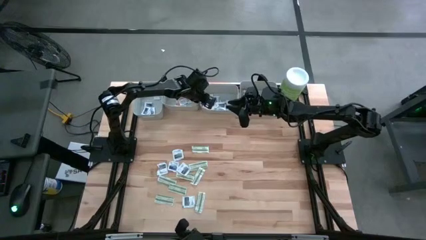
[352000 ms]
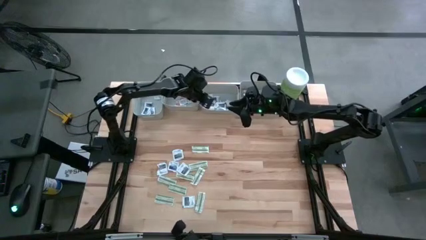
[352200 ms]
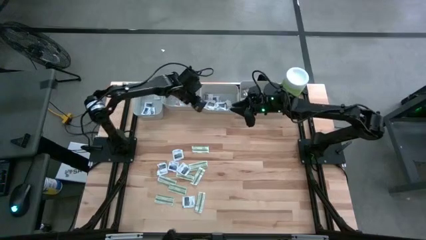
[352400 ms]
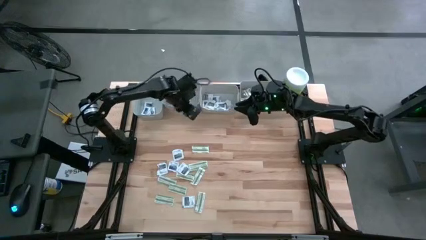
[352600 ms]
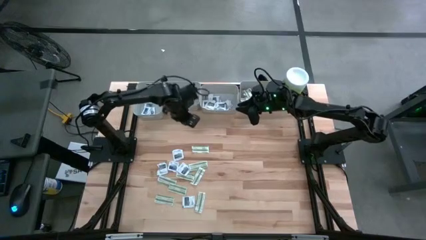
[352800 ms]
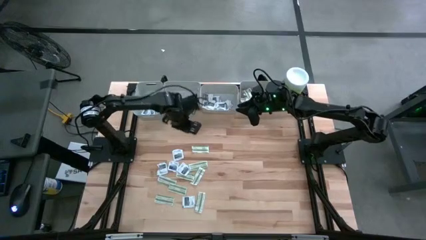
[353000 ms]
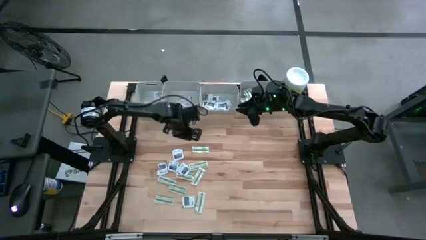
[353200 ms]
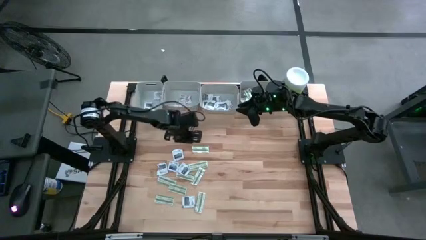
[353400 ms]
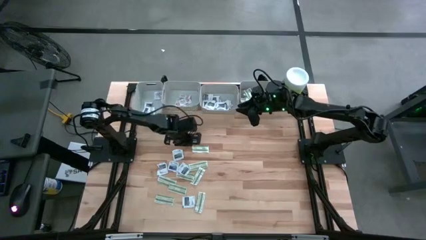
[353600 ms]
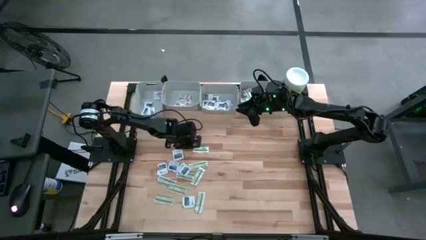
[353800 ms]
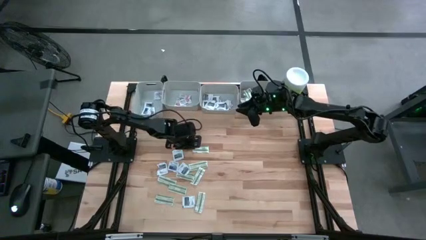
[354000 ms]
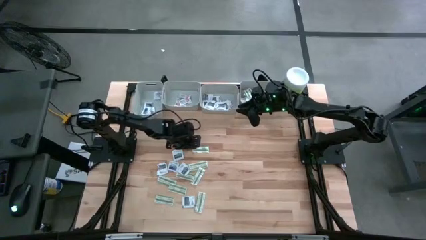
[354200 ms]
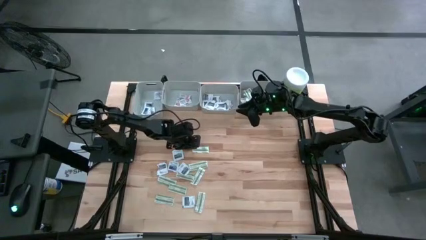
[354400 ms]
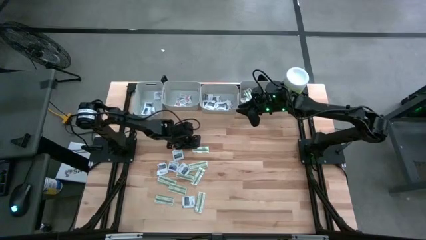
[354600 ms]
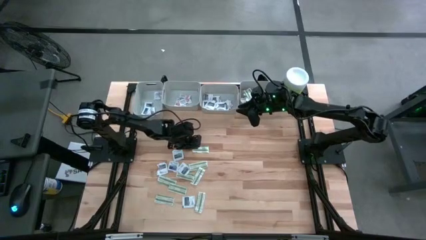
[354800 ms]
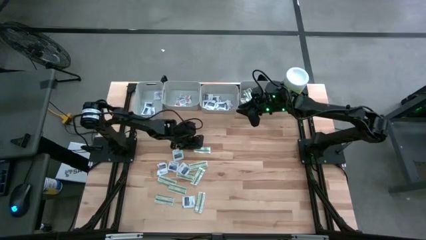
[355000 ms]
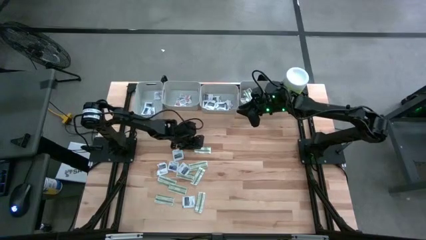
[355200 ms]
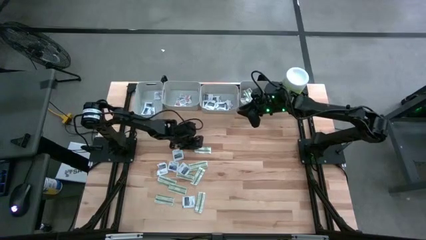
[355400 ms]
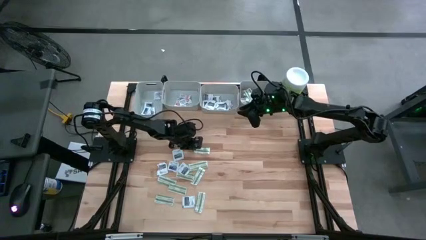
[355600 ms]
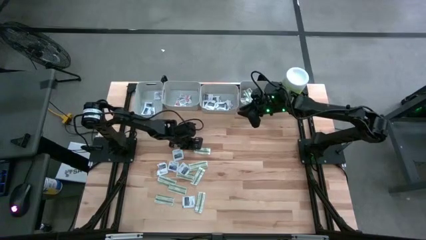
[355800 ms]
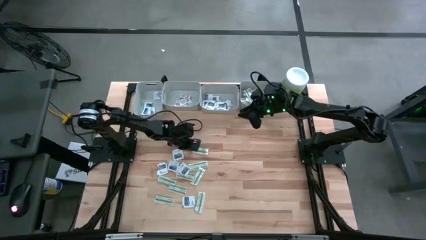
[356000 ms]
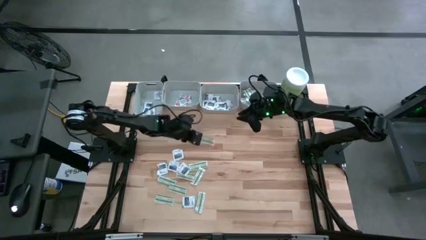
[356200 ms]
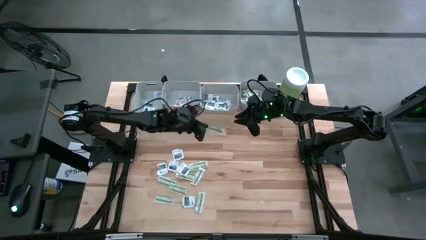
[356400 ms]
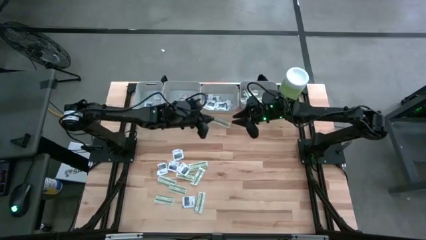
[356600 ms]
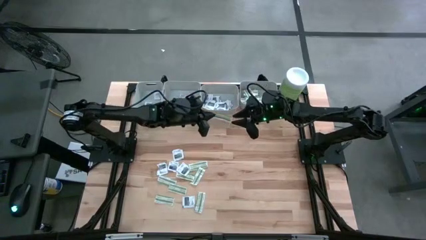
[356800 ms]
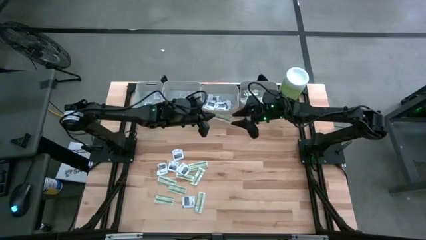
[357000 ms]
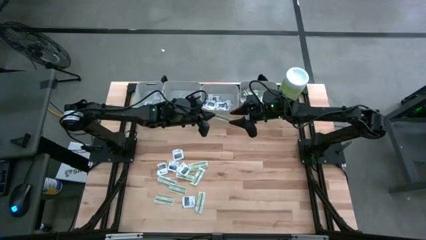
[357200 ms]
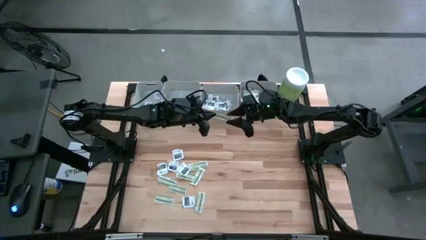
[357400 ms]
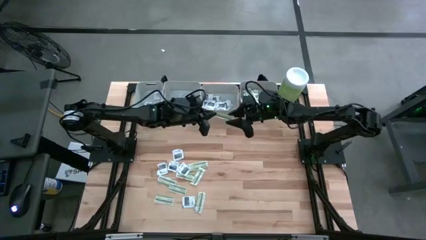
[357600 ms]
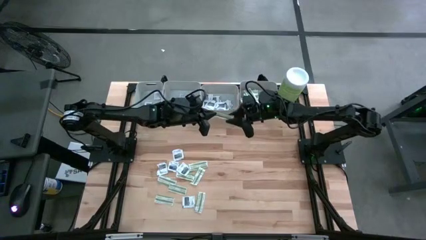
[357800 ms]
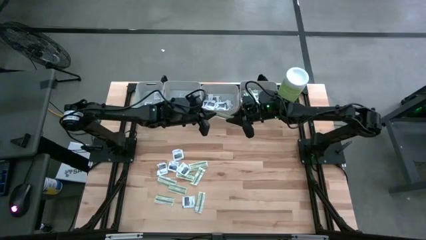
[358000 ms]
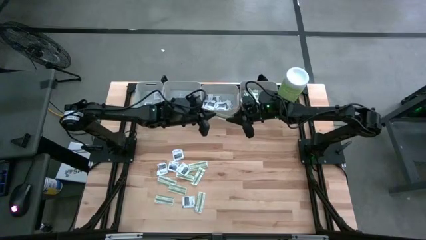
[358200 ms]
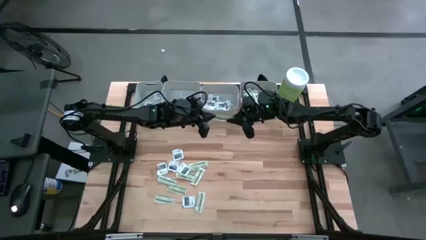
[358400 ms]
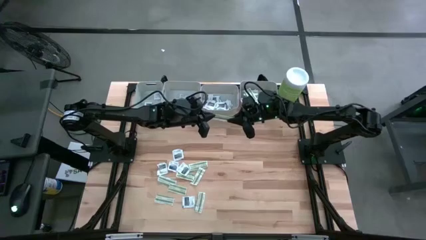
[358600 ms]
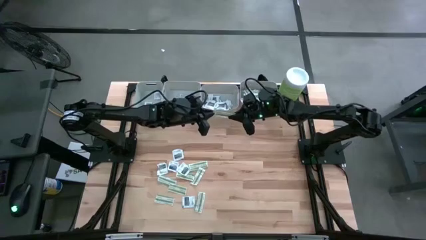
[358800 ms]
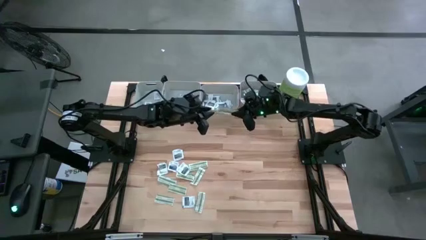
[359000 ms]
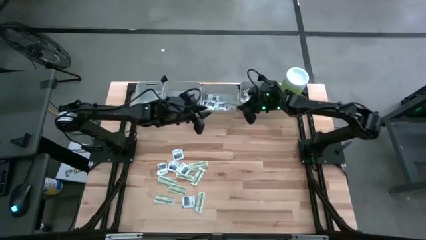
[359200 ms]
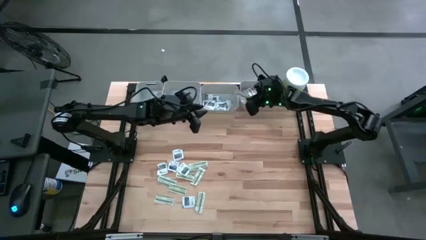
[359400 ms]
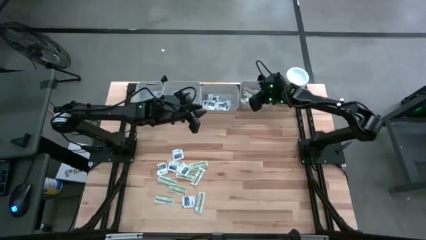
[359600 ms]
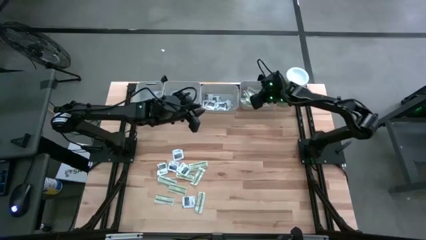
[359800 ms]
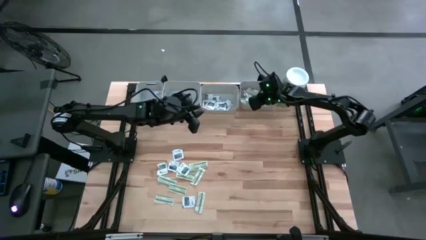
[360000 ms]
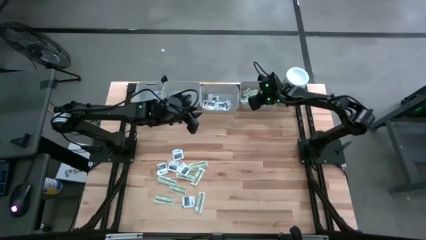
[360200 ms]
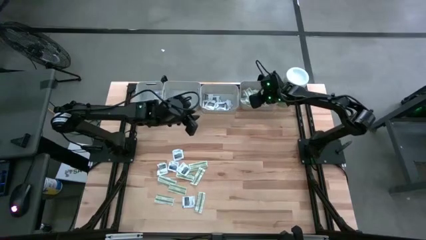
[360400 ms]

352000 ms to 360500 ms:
Task: Pick & Place First Aid Supplies
Put the green bandage into the right gray bin

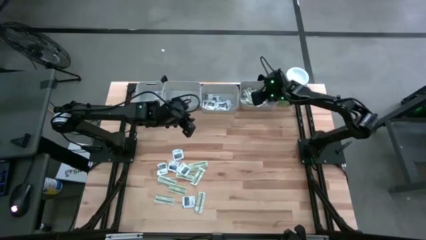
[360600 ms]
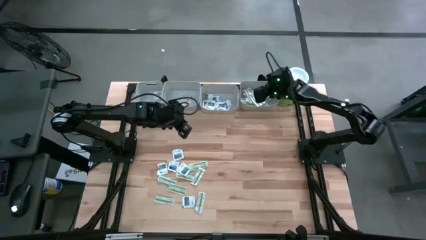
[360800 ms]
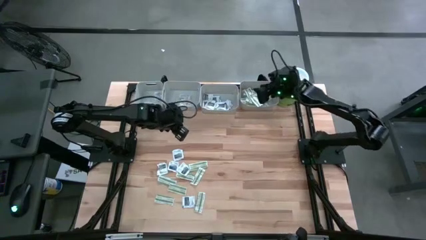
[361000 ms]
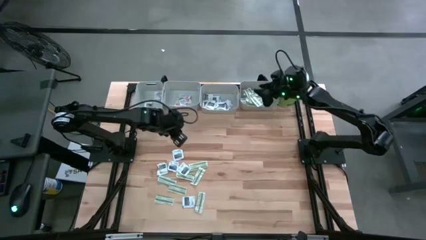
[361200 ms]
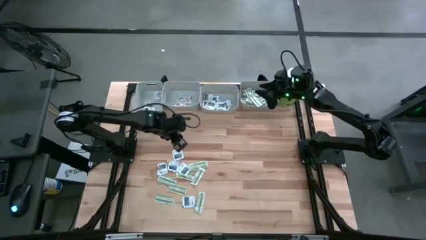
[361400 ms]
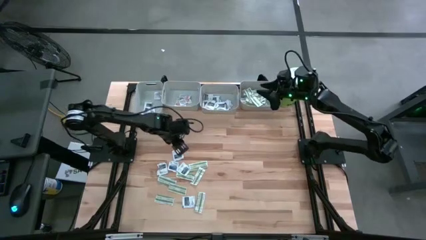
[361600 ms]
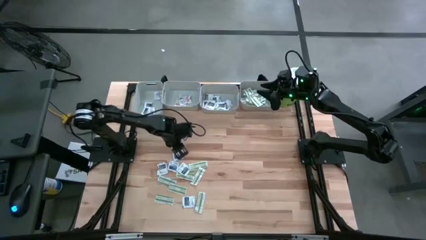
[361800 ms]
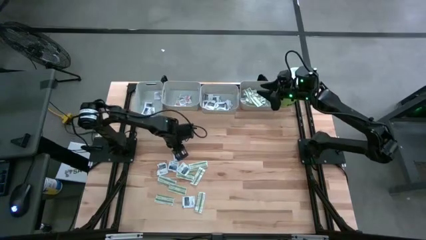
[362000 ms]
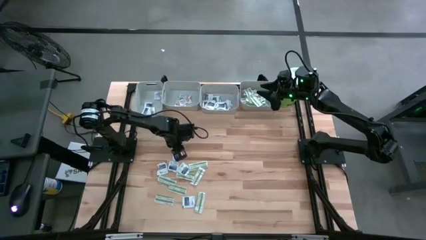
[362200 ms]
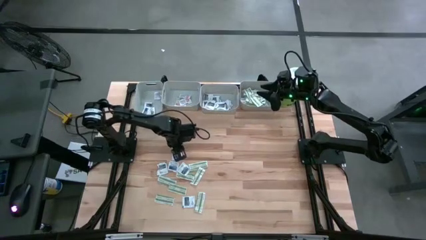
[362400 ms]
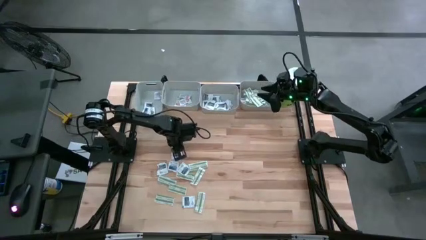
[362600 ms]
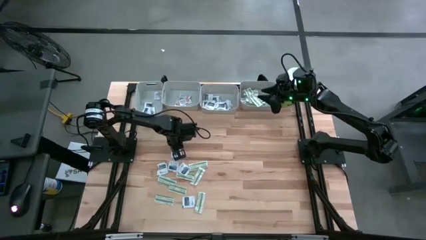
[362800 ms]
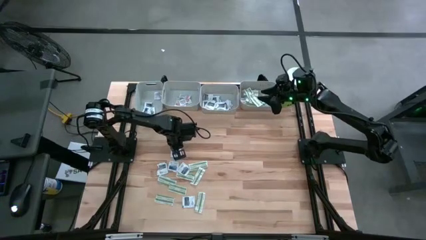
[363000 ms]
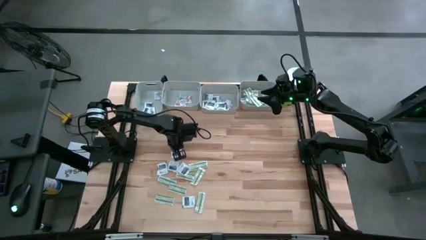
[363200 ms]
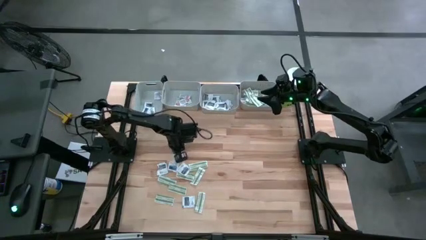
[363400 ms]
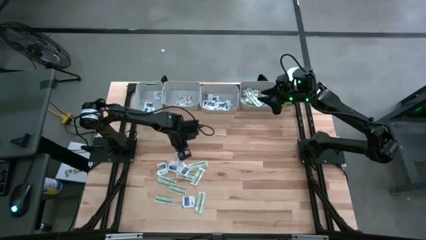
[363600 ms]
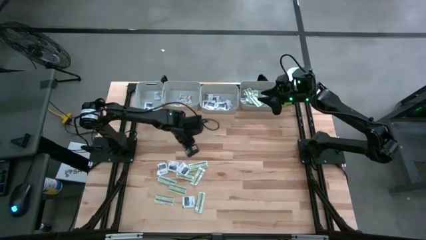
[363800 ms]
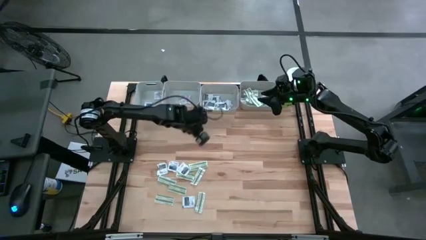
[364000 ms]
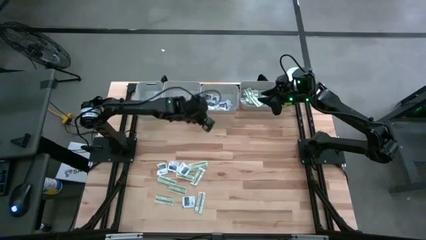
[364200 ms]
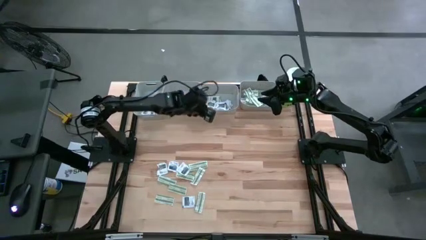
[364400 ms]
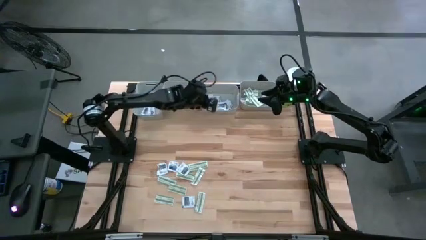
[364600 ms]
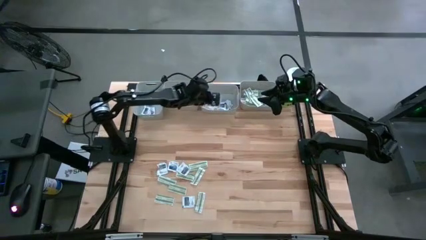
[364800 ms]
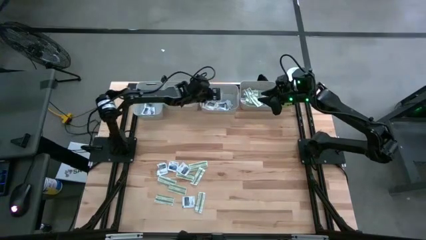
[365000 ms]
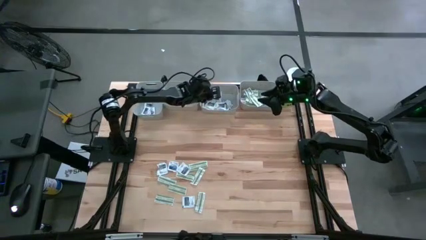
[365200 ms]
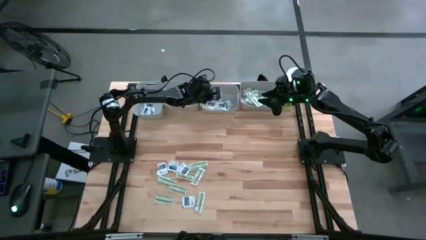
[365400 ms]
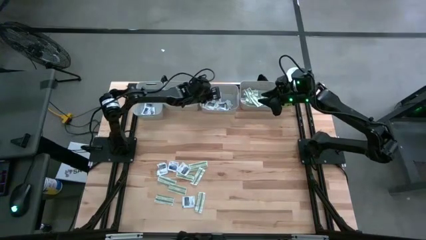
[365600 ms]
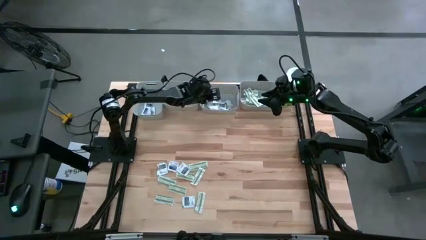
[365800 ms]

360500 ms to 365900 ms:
Put the gray towelette pack into the middle right gray bin

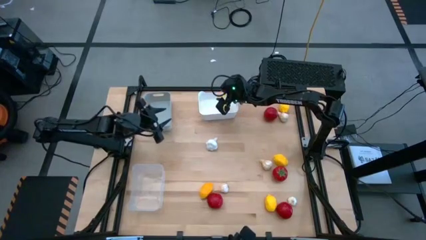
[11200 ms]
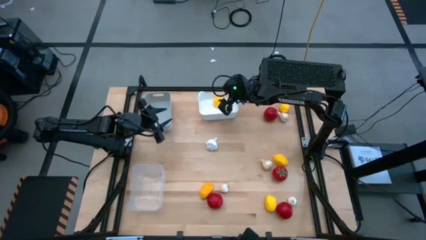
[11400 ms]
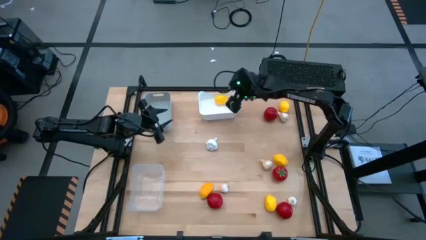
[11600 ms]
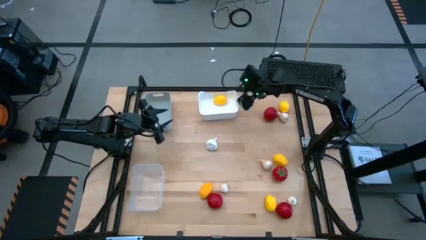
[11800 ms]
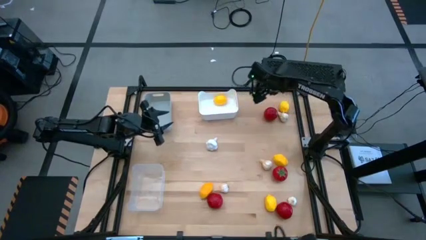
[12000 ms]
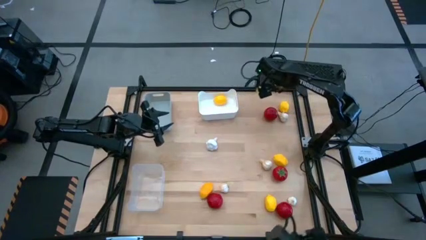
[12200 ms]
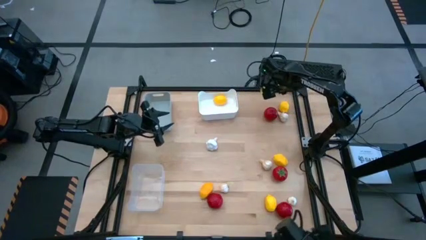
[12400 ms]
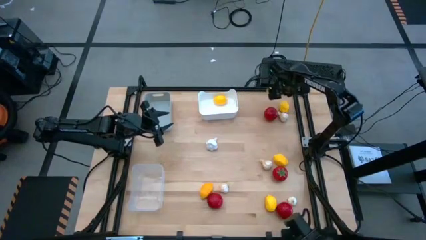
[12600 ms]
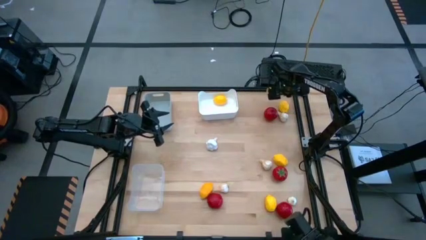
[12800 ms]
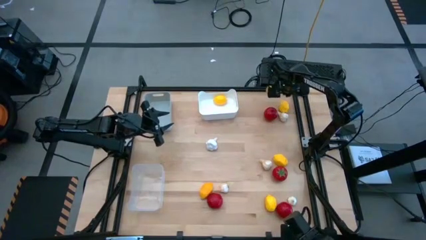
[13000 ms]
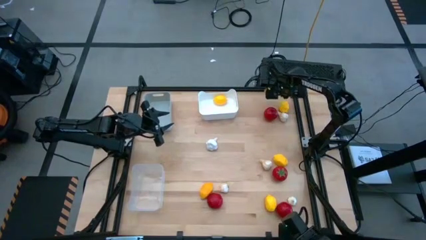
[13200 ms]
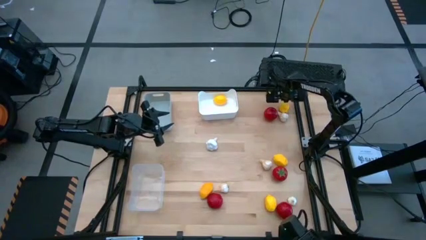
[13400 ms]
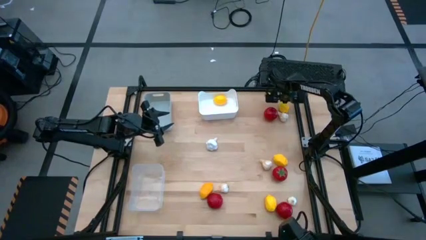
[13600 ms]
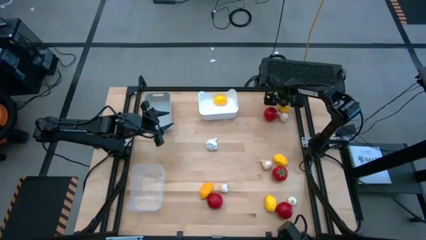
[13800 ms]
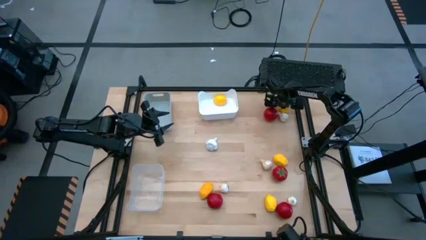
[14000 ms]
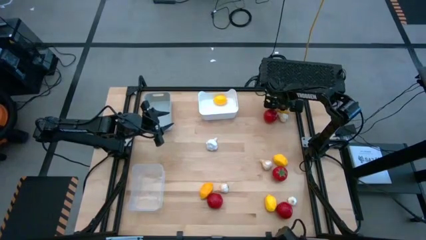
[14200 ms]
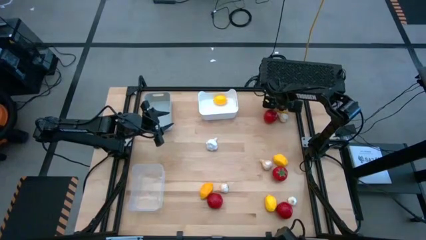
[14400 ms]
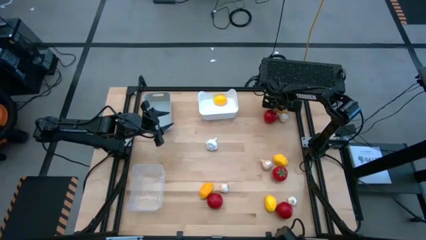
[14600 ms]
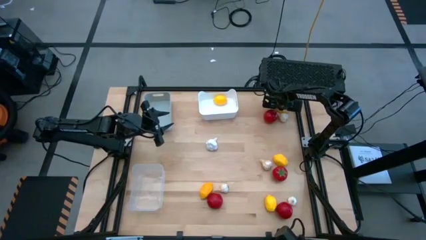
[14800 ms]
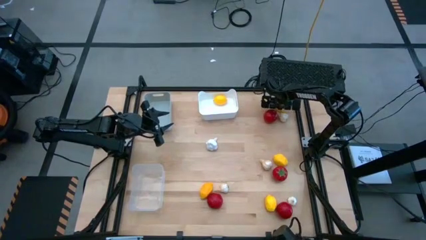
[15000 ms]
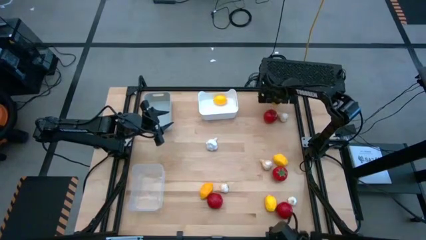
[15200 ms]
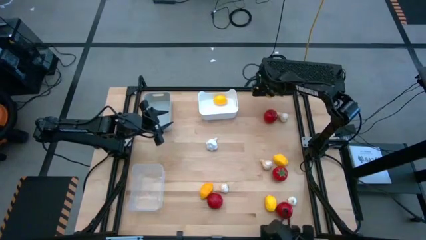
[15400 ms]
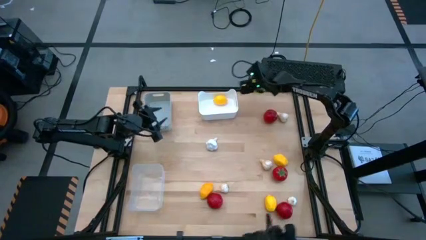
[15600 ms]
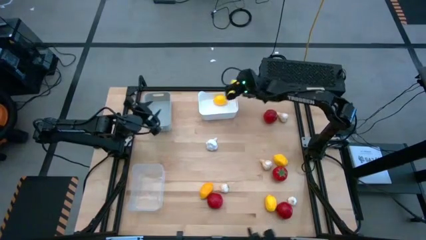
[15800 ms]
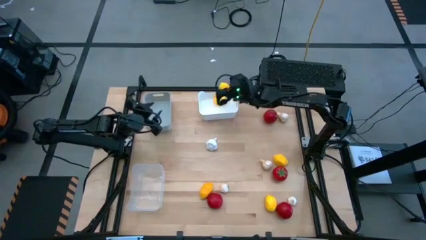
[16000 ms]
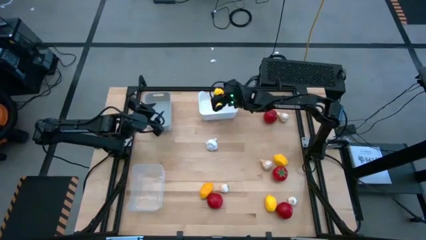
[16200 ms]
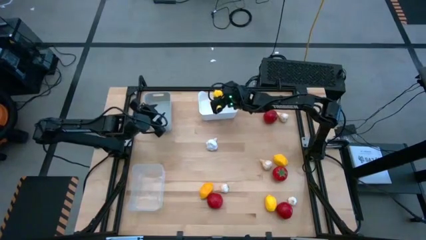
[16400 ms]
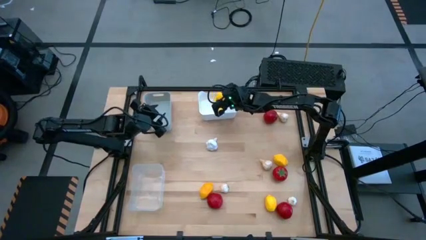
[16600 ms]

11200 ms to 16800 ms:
Task: Sort produce into baskets
Put the lemon into the white bin
